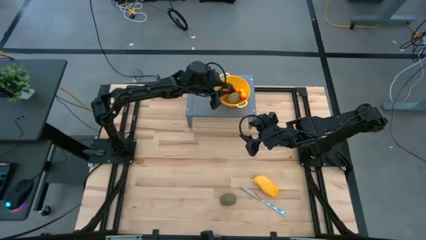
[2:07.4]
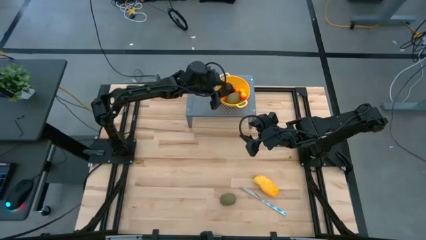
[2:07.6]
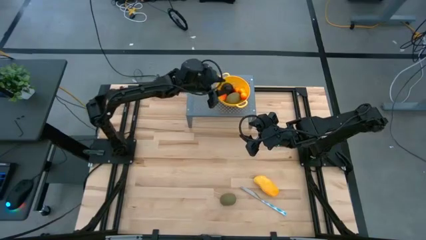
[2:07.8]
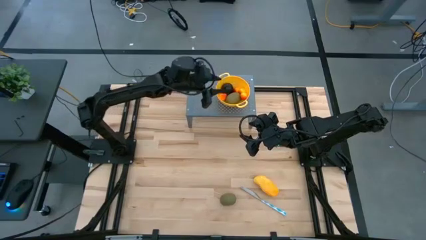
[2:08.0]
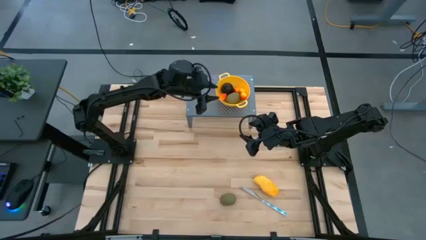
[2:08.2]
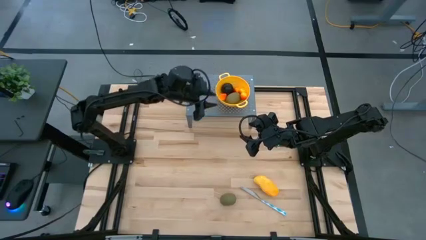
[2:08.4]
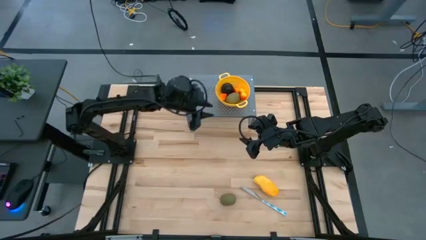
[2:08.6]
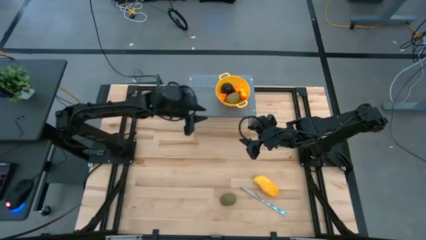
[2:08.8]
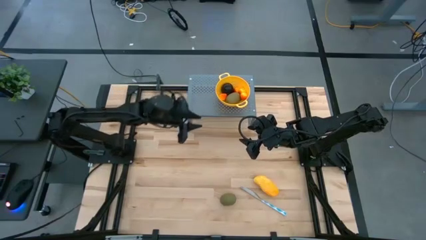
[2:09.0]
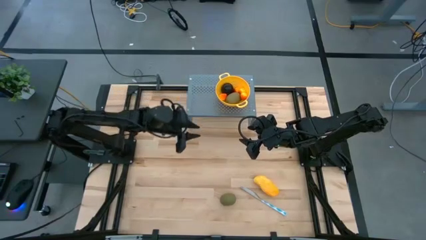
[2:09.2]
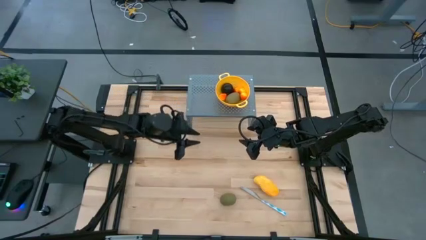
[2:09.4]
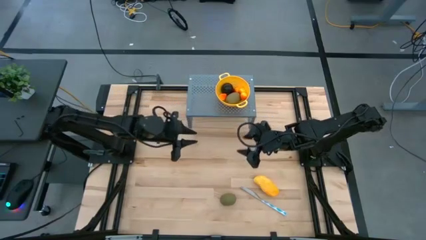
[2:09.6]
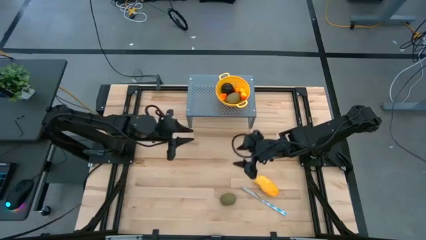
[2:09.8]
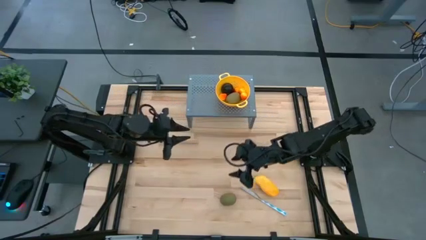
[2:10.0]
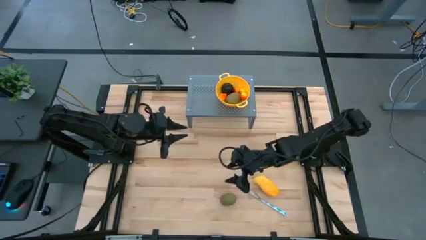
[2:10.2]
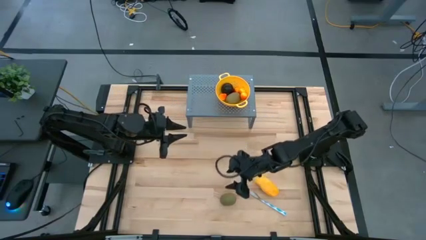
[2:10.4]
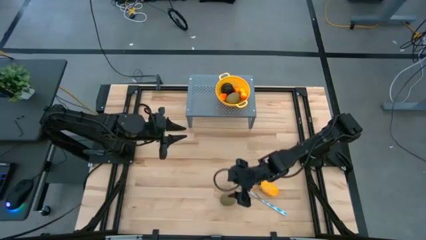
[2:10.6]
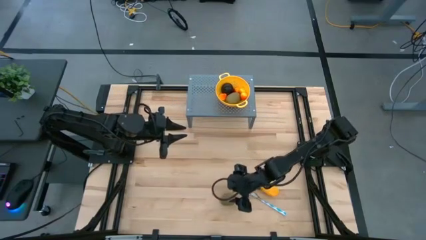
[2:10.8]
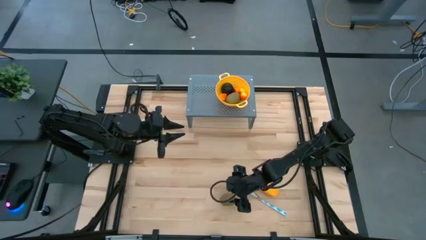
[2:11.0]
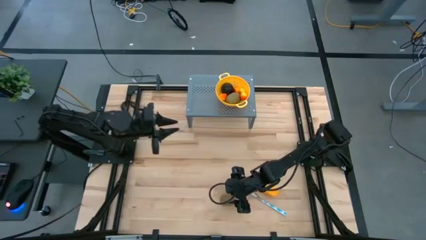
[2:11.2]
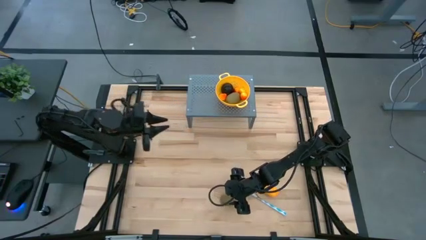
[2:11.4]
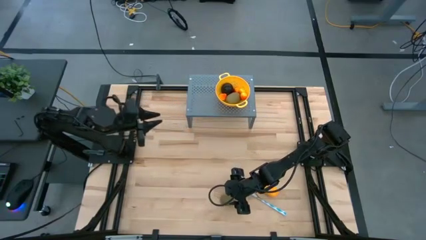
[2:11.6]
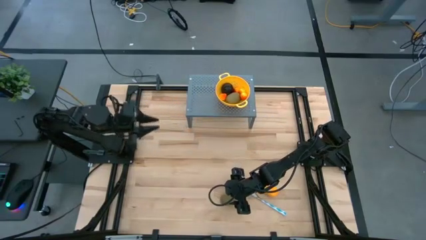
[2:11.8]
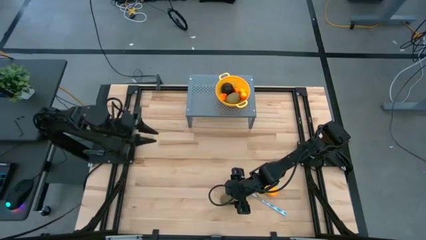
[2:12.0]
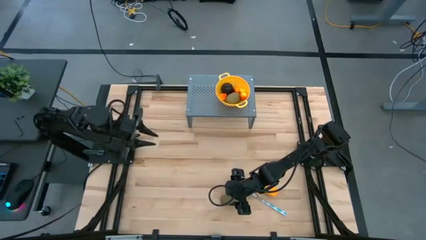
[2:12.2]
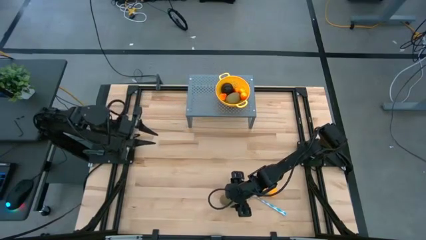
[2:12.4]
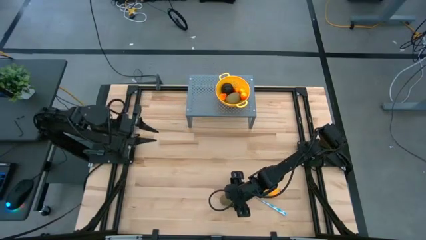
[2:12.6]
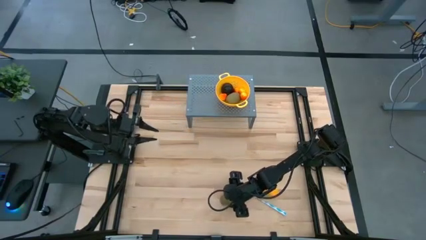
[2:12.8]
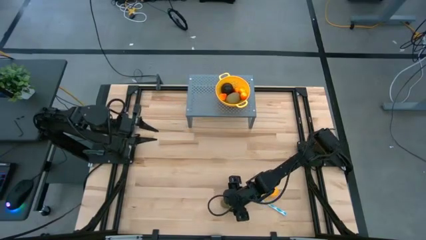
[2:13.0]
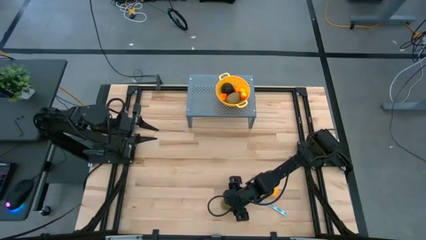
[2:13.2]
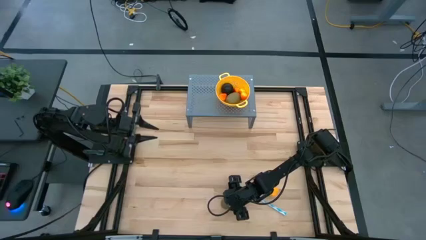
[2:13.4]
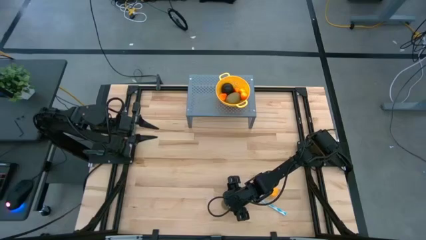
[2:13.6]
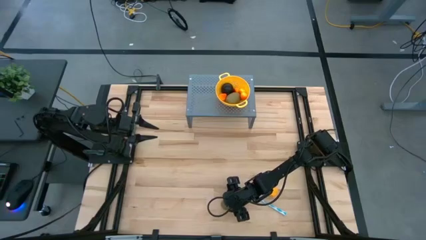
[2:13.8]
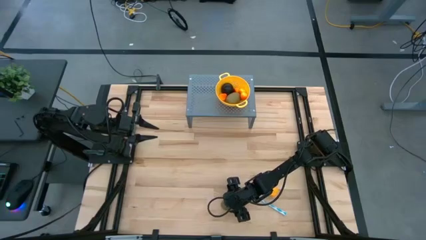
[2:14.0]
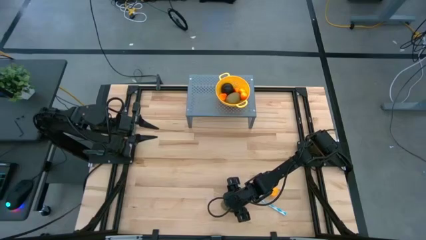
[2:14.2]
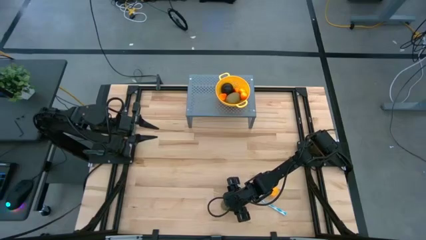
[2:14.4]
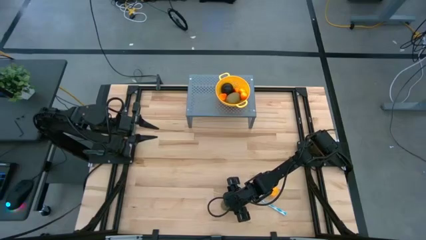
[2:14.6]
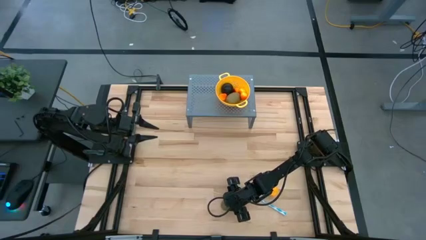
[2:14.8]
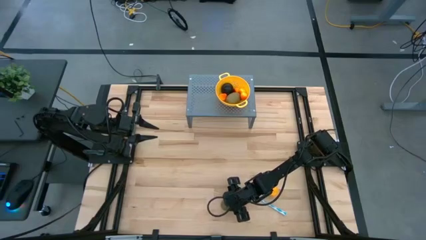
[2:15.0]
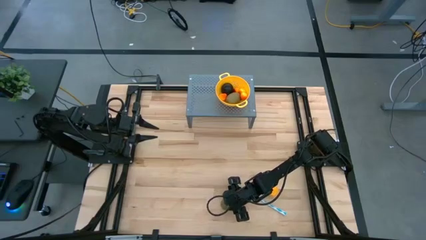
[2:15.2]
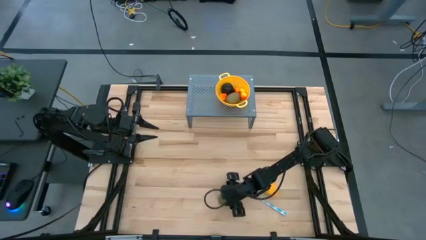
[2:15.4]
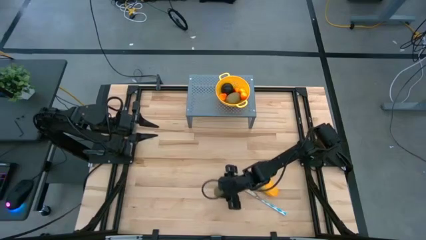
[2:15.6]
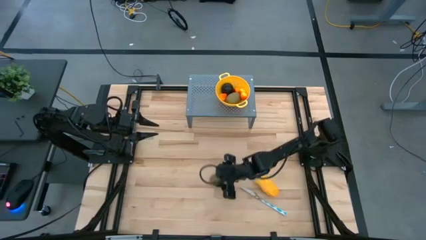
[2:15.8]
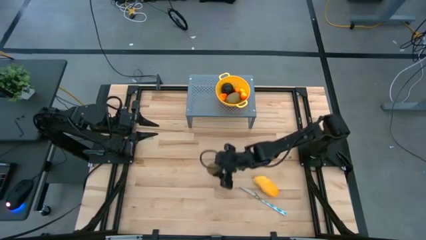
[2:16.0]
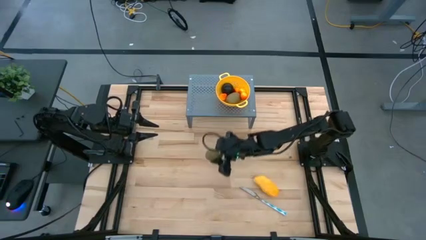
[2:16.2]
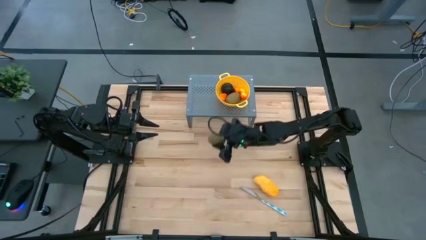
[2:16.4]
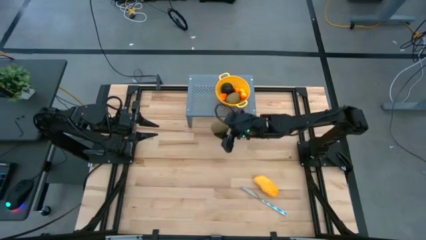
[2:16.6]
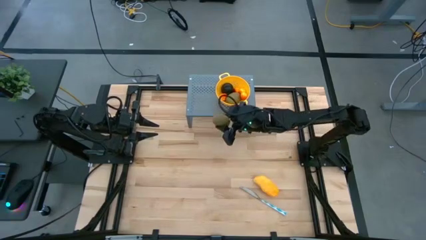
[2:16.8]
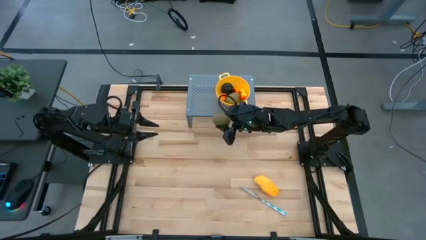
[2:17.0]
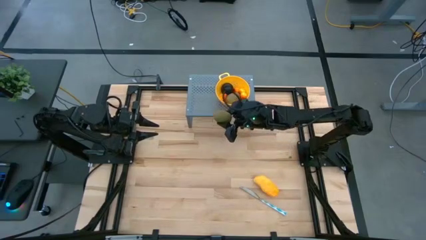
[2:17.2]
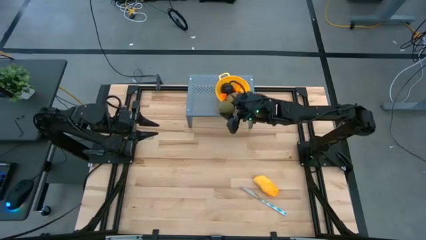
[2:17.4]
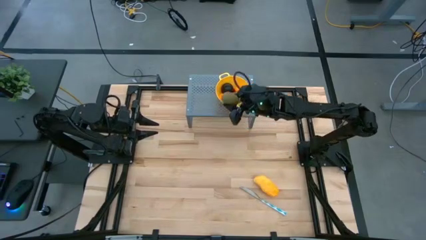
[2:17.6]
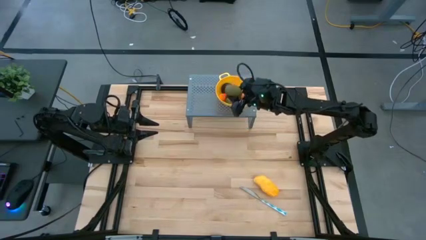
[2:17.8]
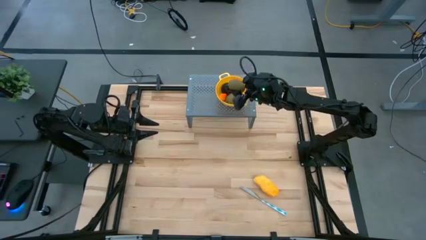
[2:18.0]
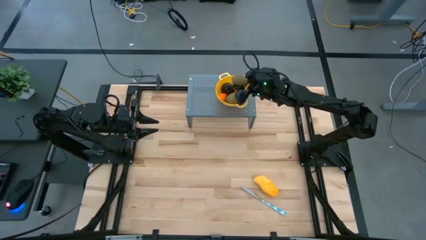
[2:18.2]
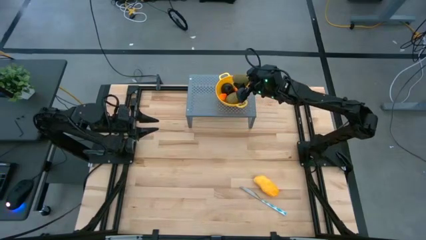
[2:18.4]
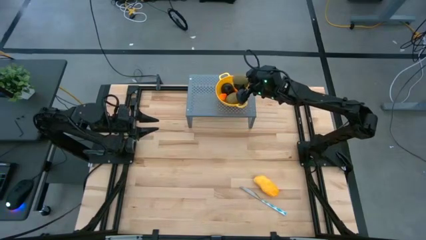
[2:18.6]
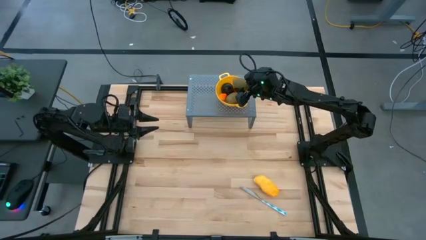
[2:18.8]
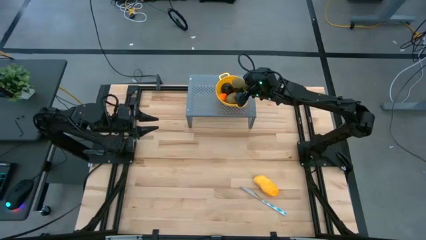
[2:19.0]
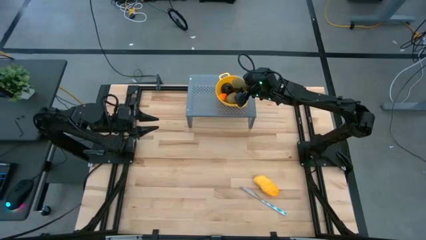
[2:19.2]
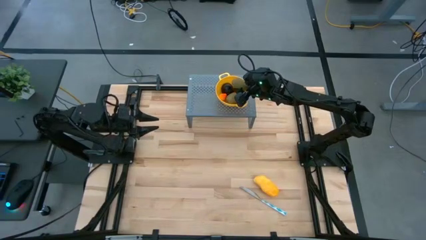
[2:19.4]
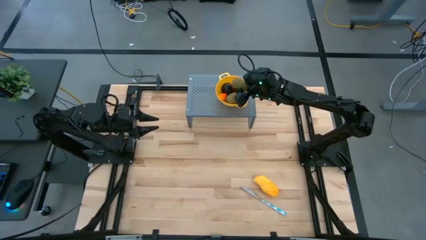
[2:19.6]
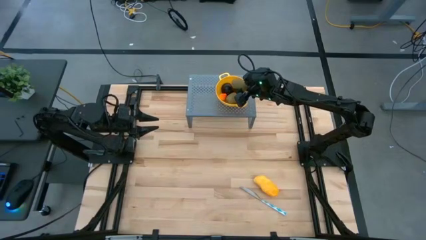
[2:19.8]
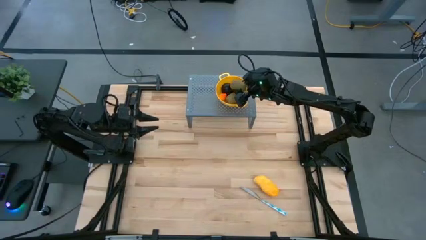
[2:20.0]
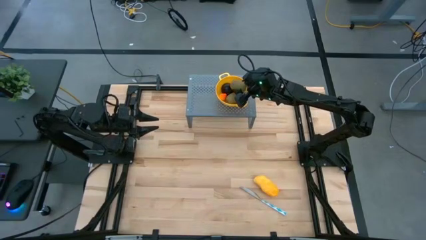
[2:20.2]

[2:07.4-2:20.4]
Task: Pick & Place Fruit
Put the kiwi into the yellow strainer bowl on the shelf
